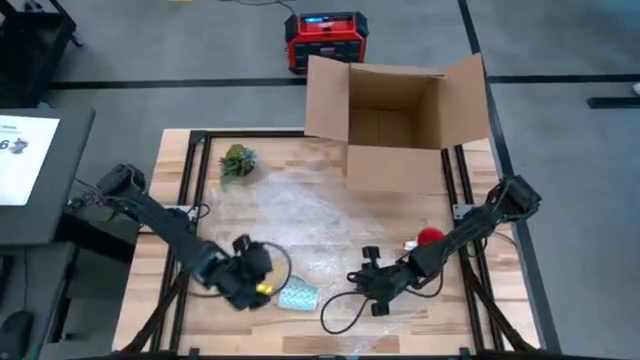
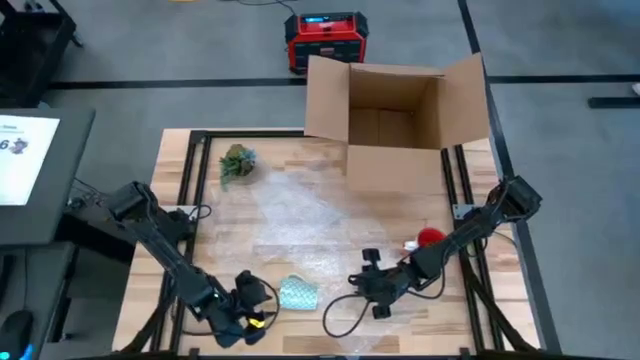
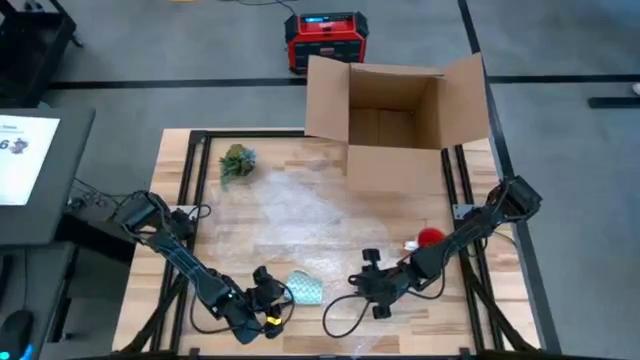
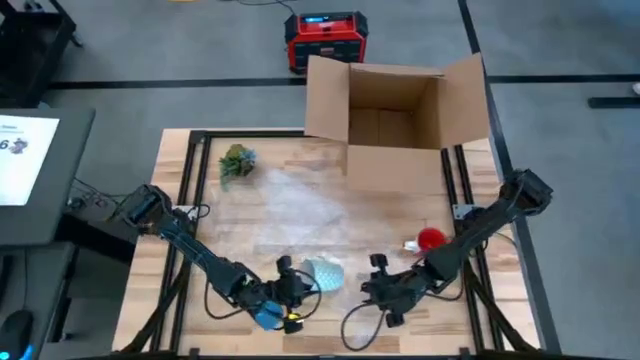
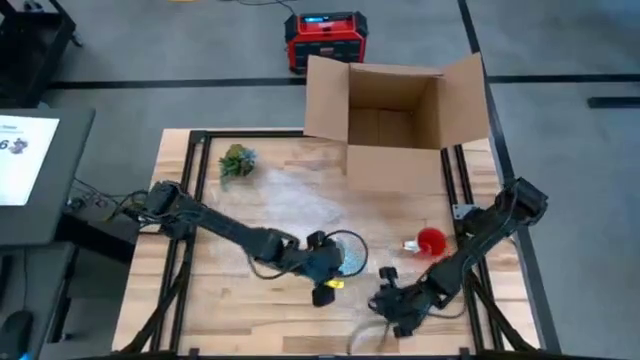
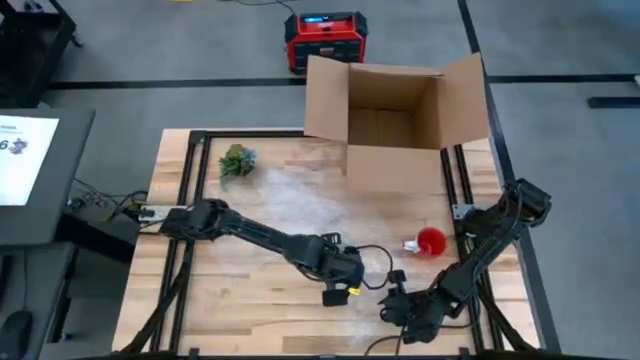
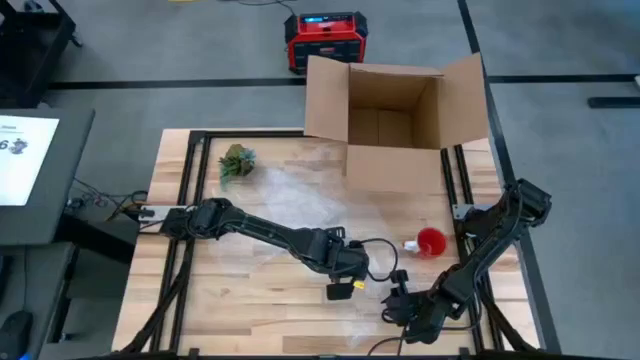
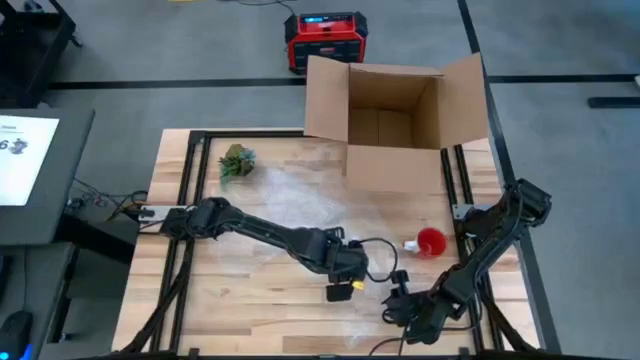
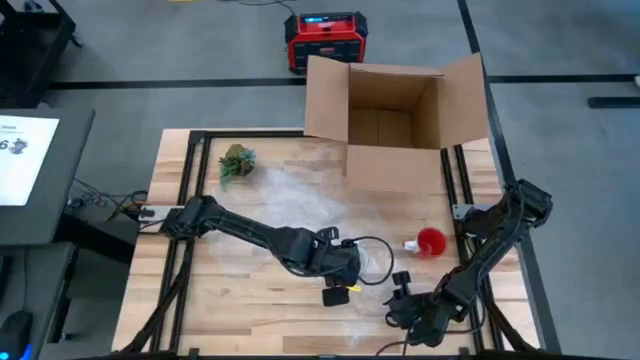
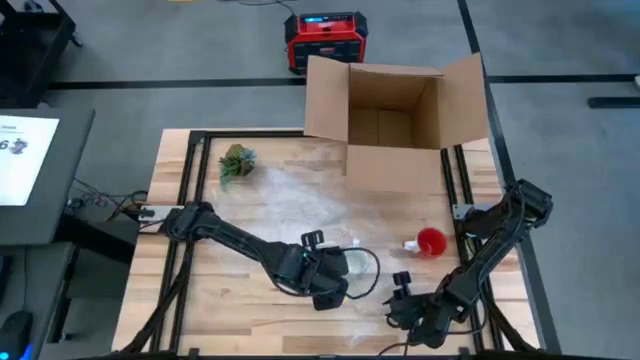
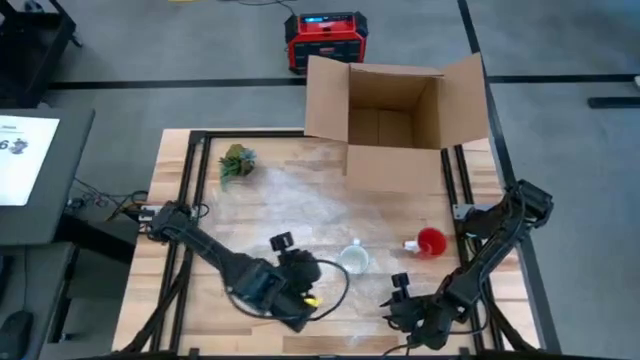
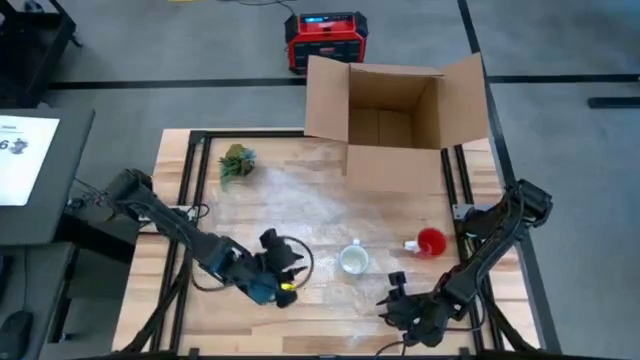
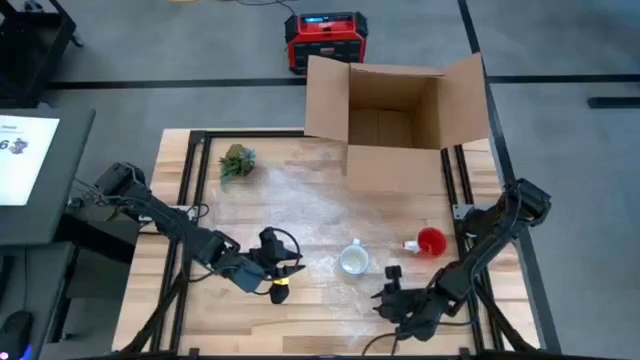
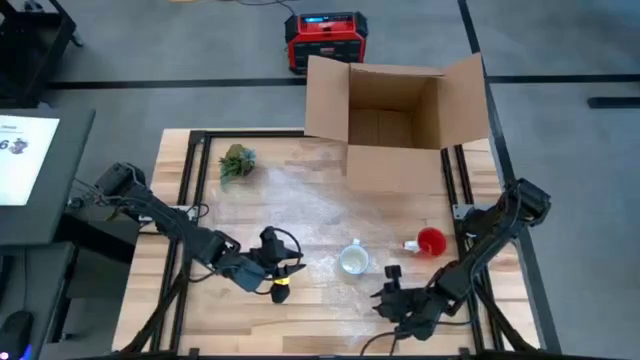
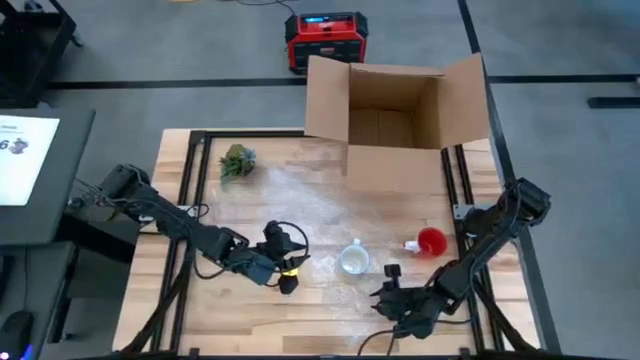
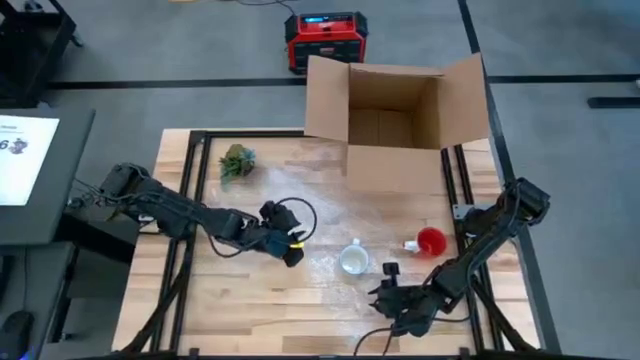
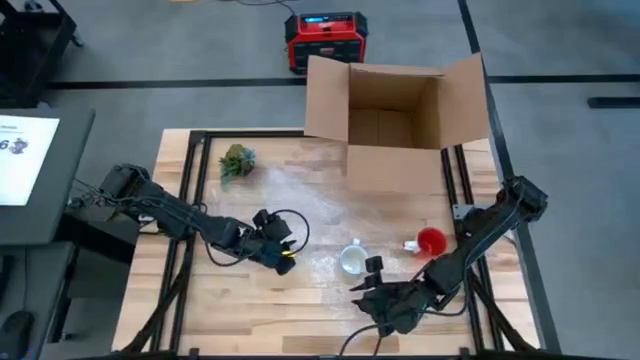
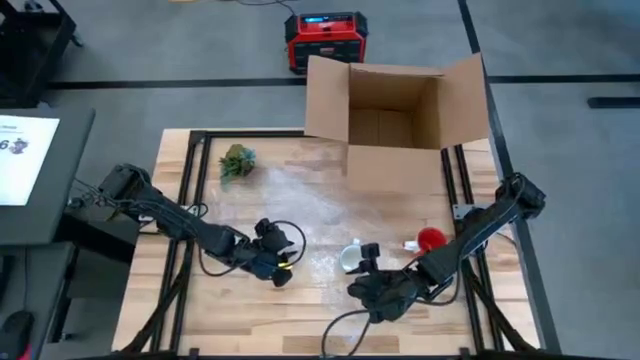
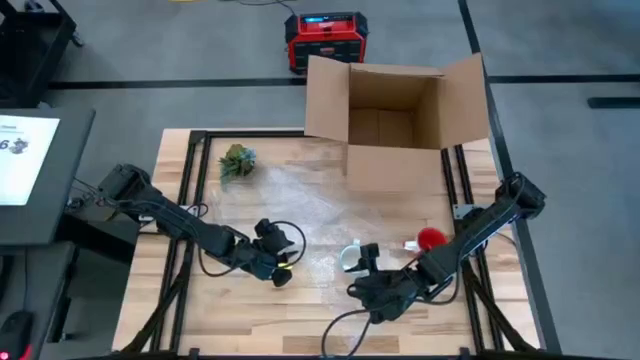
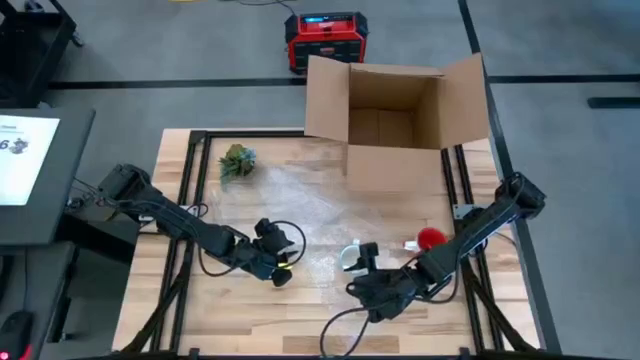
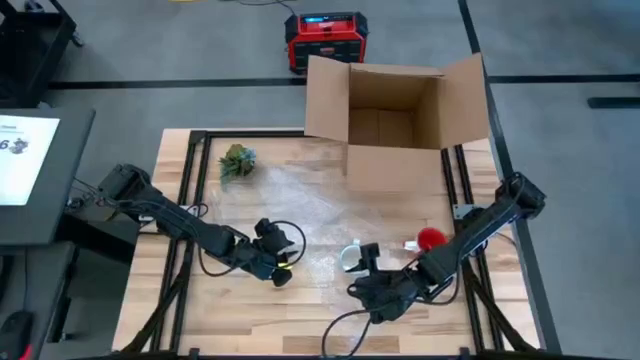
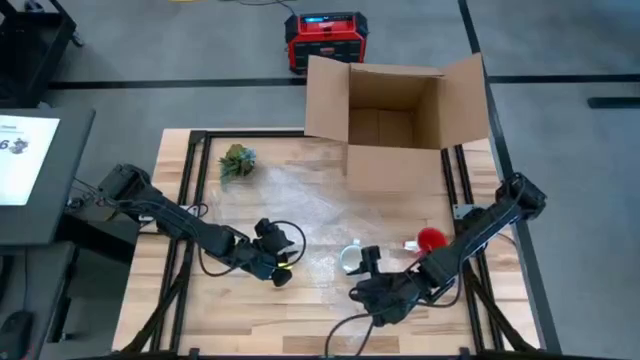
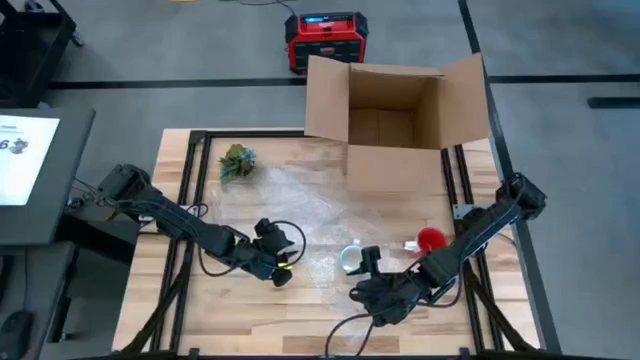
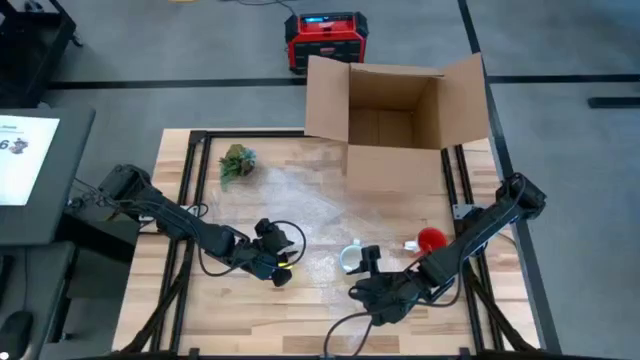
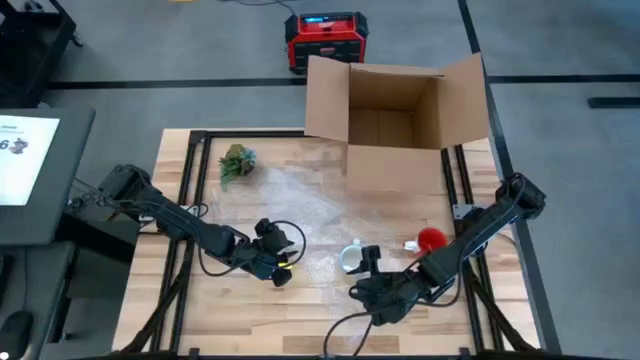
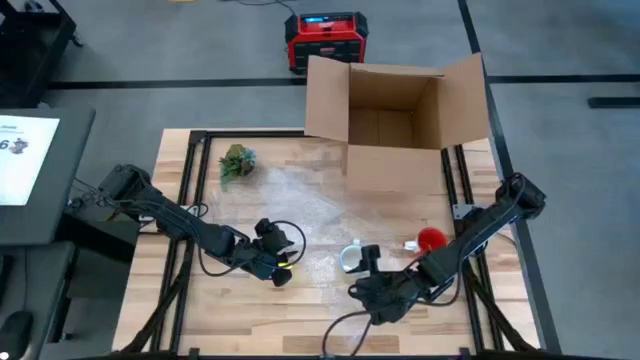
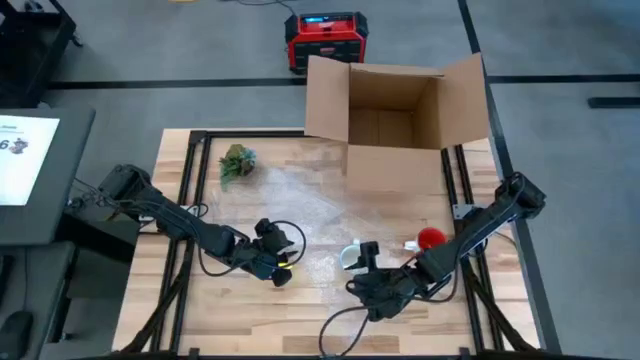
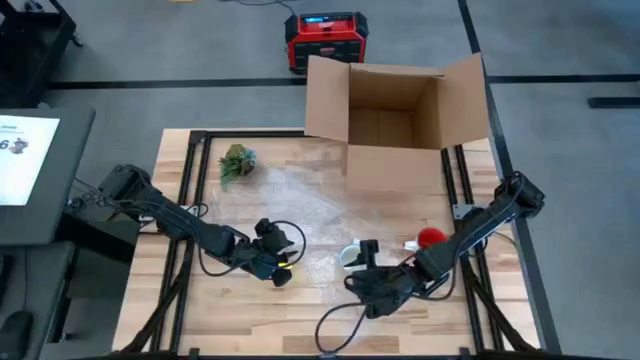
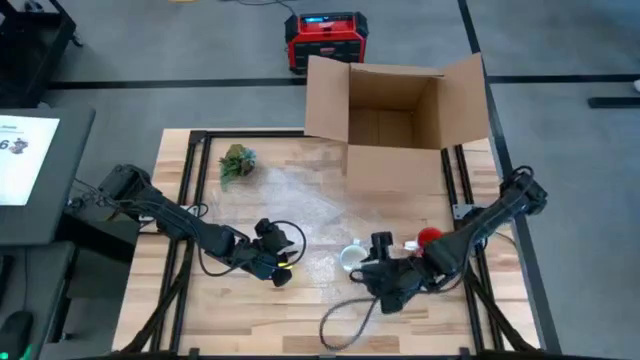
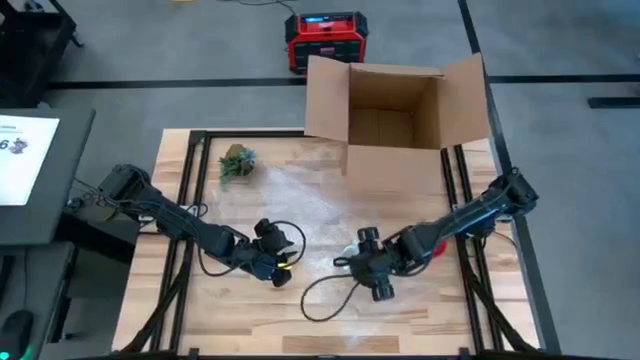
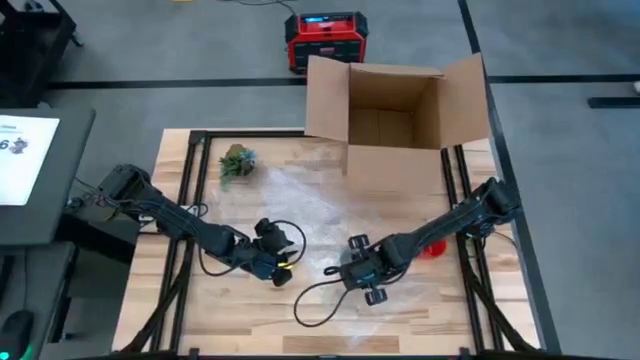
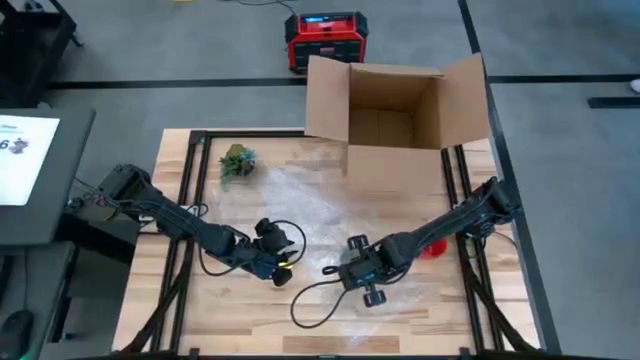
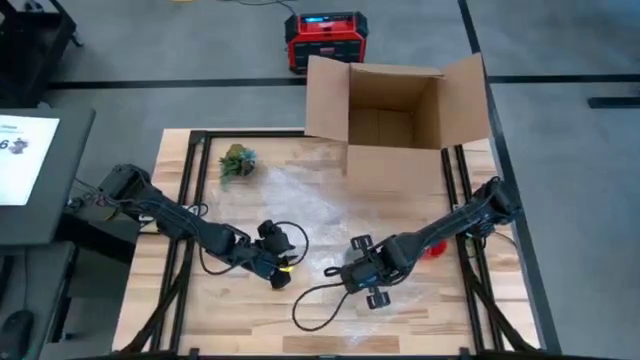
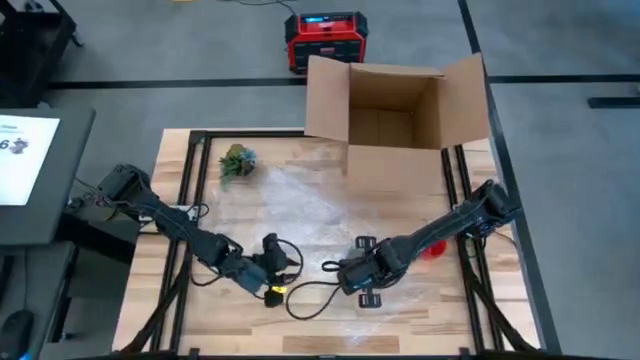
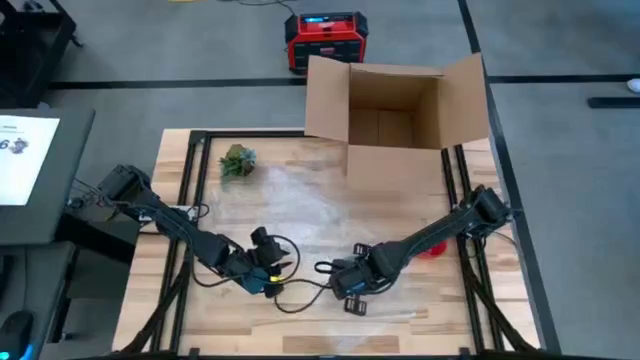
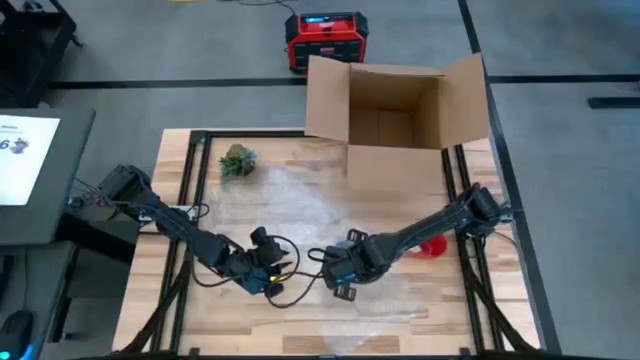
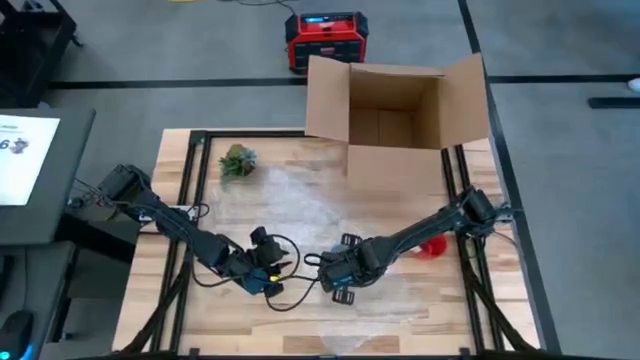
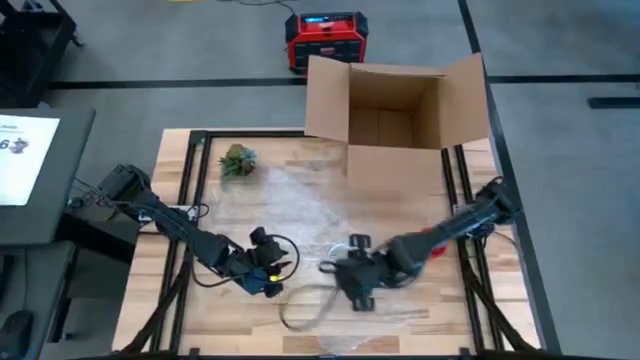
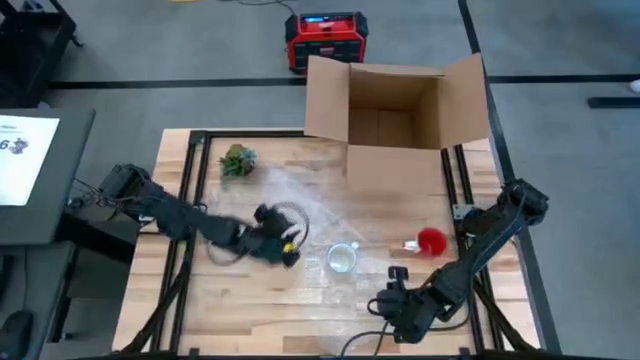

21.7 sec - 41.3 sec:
Task: wrap mug
Wrap the blue patterned mug with the transparent bubble wrap
